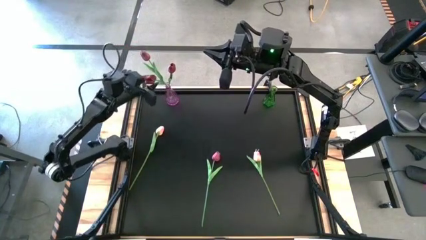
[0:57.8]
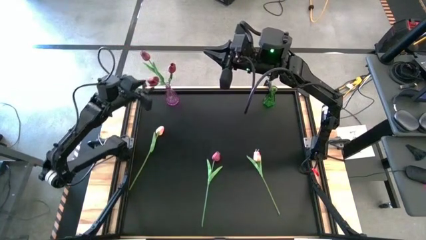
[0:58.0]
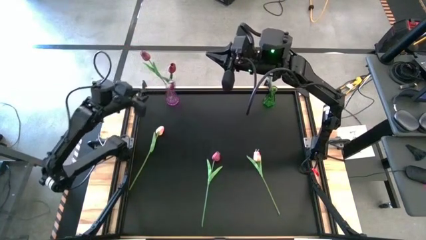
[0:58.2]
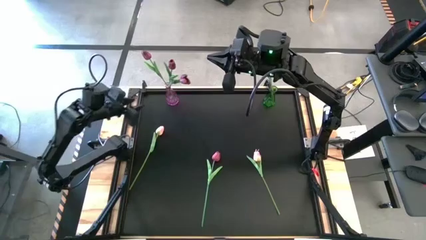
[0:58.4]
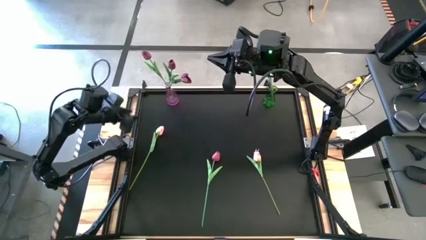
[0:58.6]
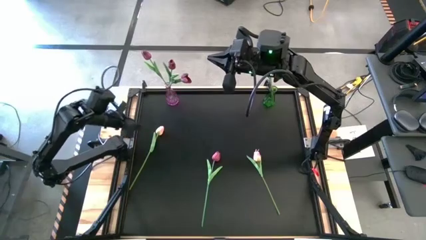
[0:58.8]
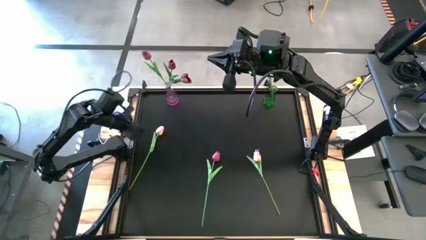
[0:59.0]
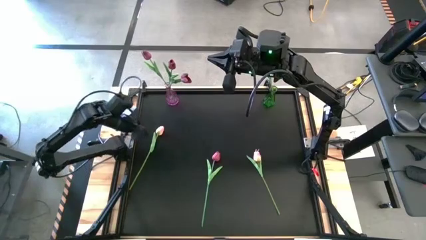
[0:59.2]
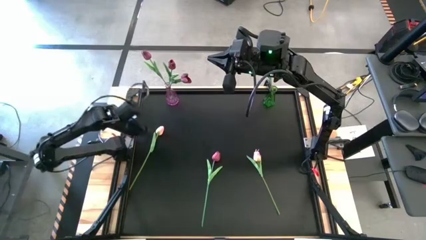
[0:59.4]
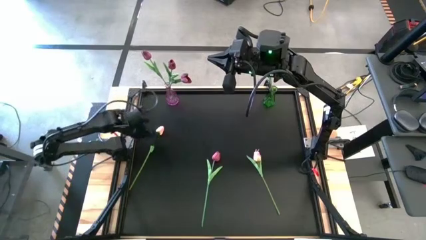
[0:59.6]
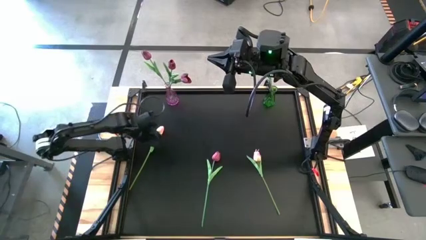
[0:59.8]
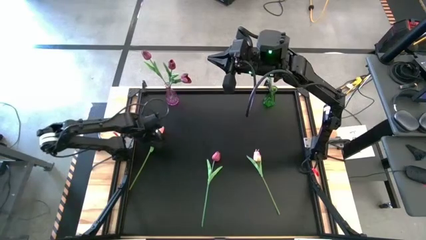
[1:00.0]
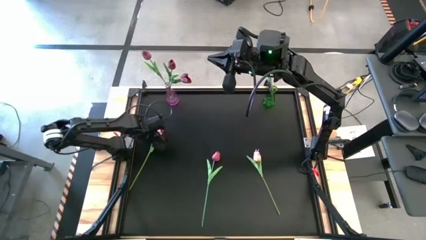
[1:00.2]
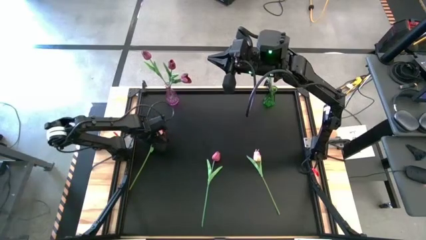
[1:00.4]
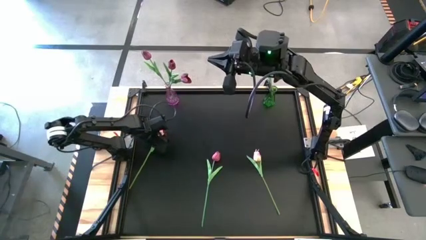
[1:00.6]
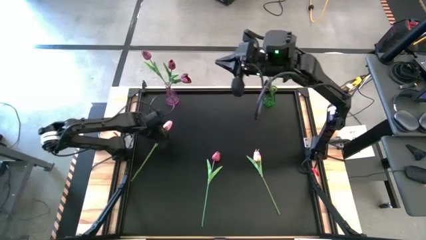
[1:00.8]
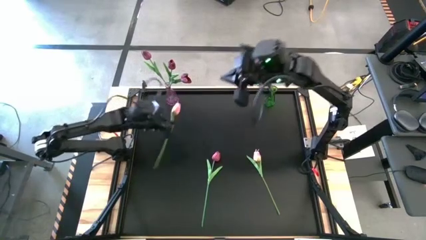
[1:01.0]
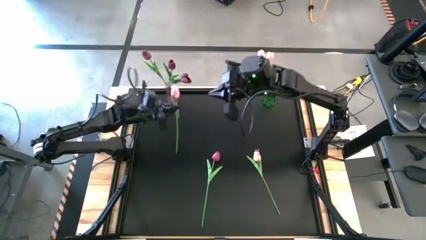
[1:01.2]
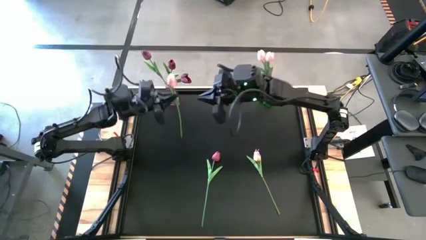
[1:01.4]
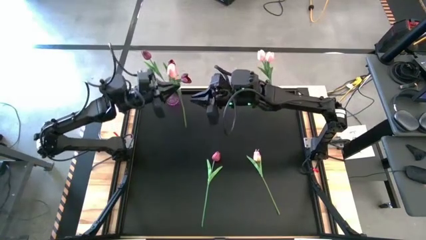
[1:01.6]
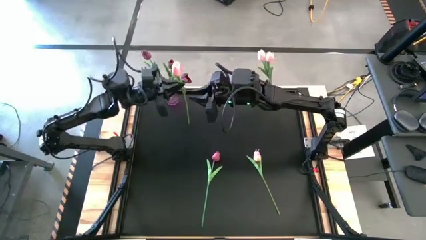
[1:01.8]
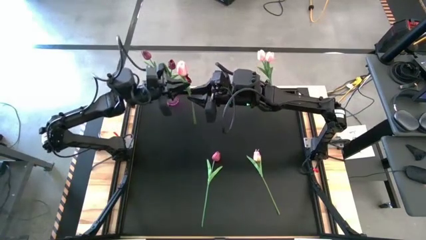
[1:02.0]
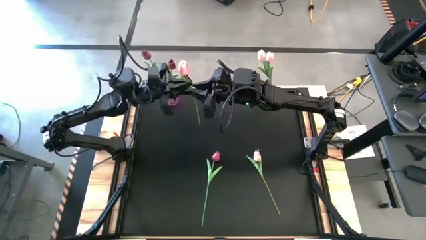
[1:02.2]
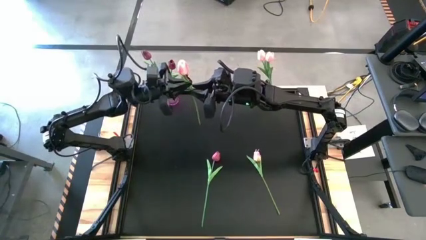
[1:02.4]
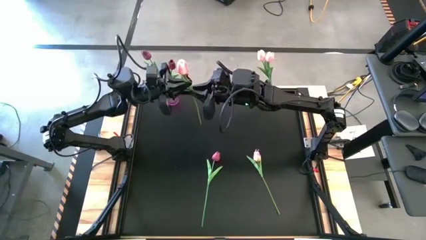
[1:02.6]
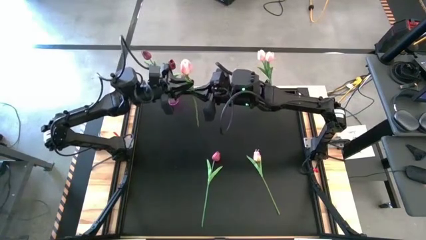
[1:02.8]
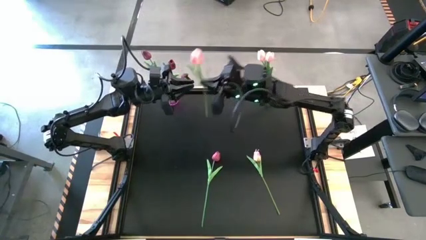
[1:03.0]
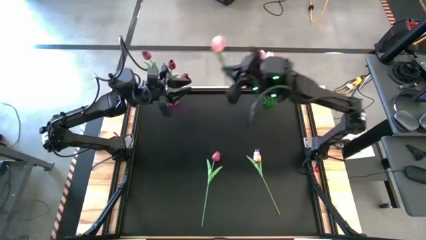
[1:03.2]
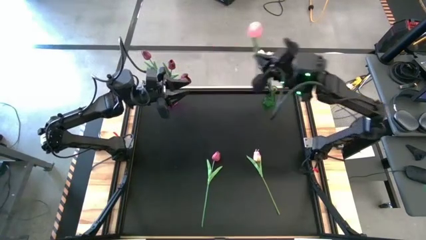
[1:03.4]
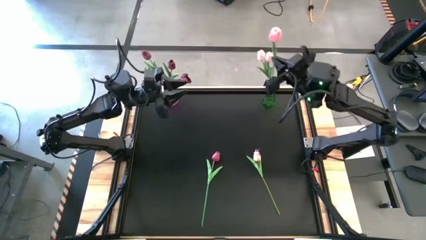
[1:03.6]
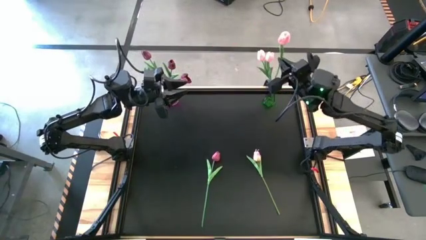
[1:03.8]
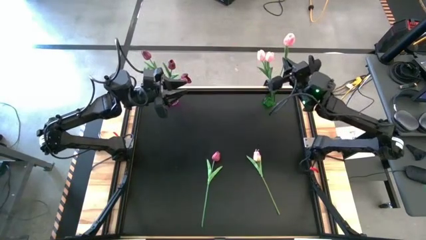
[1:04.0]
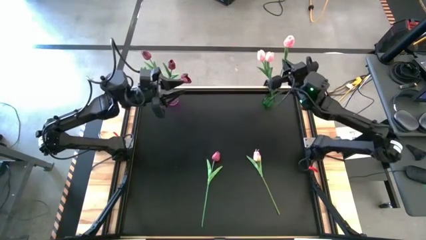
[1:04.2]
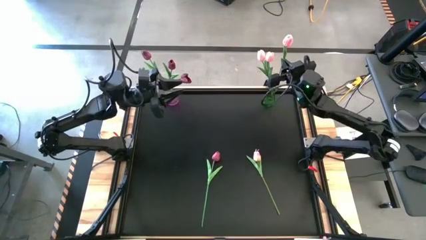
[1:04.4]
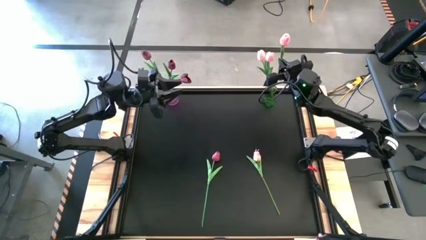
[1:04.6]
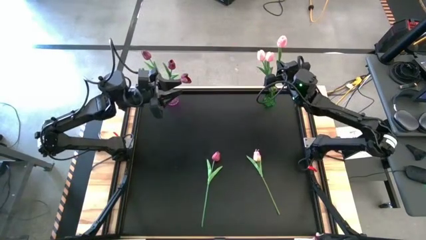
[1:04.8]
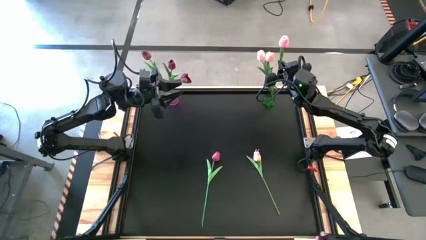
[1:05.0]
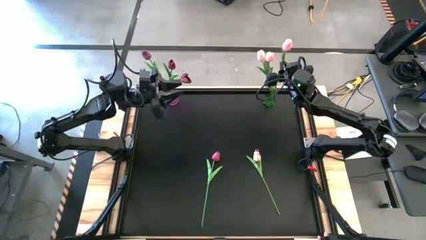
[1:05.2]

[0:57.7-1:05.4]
Task: Sort flowers into vase by color
Put the left pink flower into the green vase

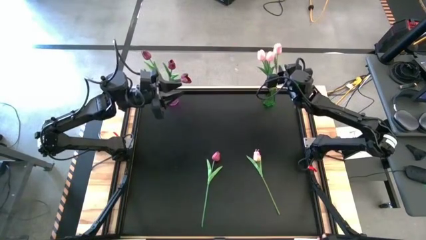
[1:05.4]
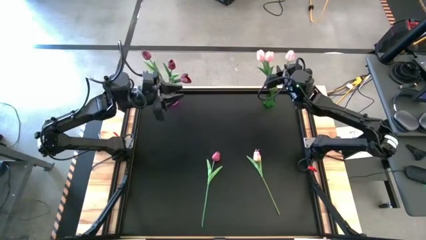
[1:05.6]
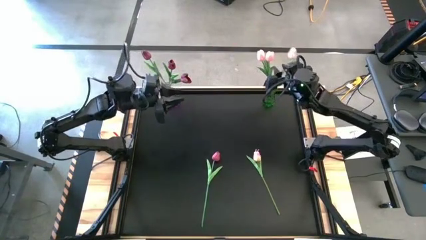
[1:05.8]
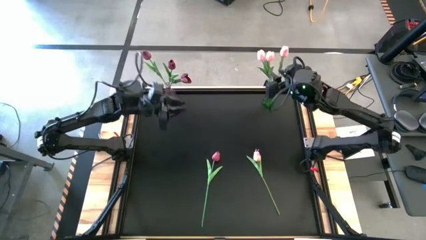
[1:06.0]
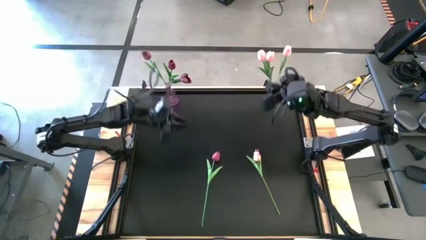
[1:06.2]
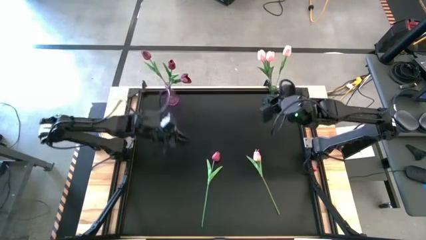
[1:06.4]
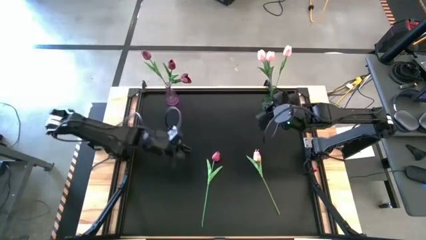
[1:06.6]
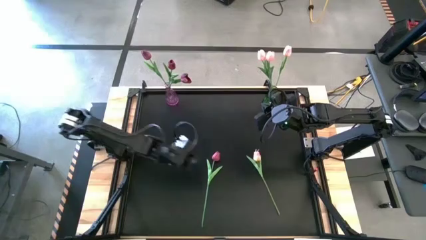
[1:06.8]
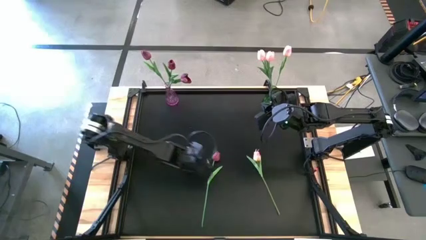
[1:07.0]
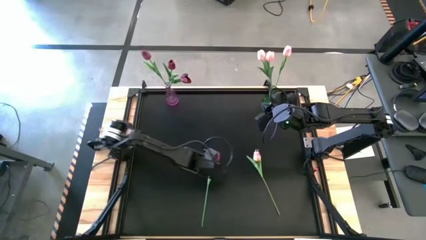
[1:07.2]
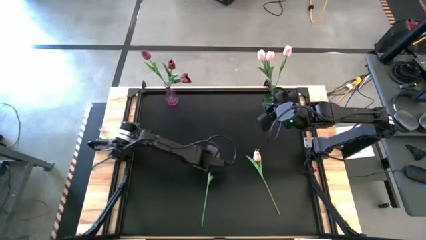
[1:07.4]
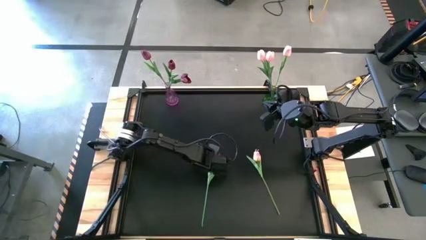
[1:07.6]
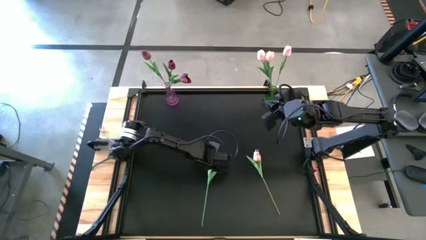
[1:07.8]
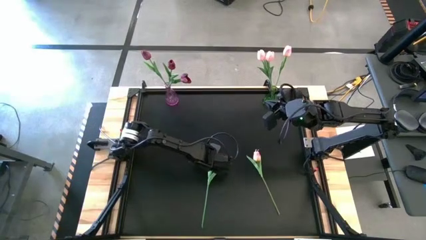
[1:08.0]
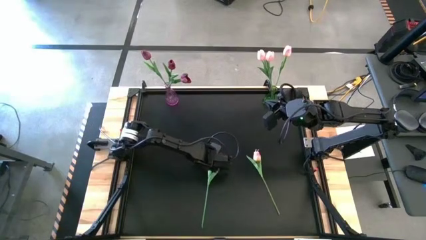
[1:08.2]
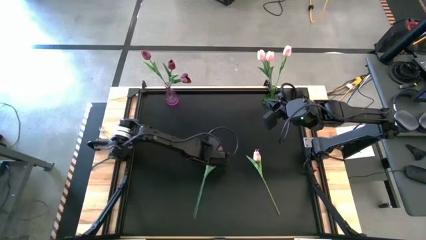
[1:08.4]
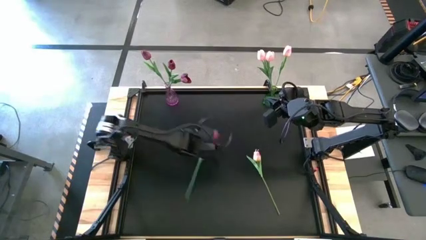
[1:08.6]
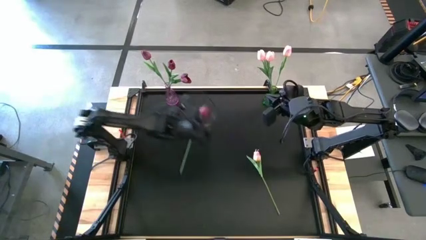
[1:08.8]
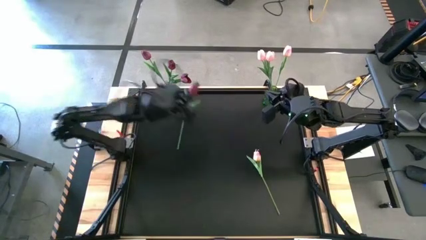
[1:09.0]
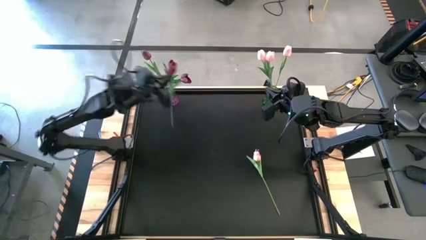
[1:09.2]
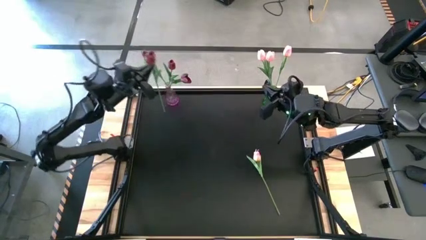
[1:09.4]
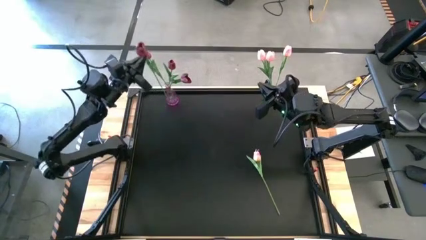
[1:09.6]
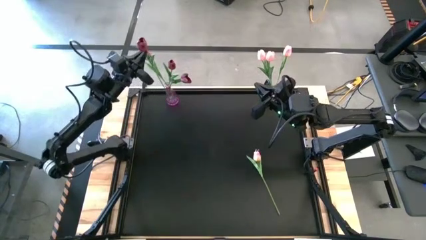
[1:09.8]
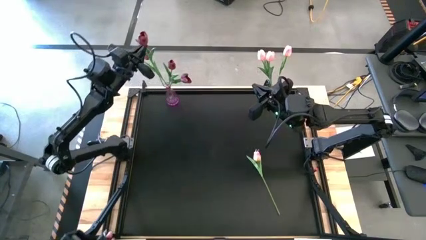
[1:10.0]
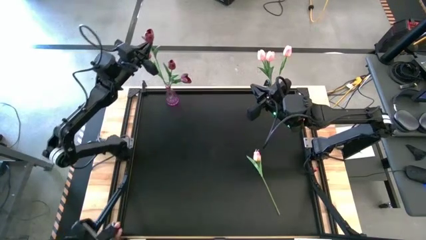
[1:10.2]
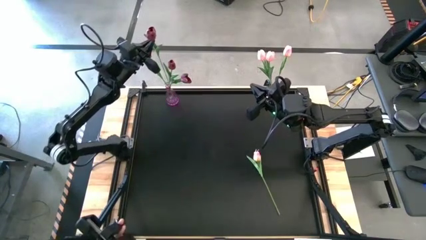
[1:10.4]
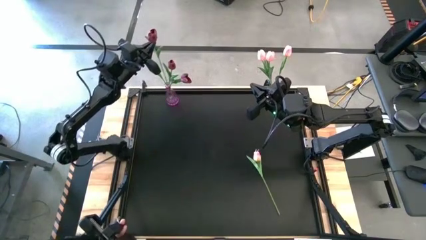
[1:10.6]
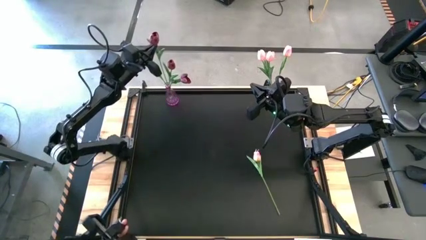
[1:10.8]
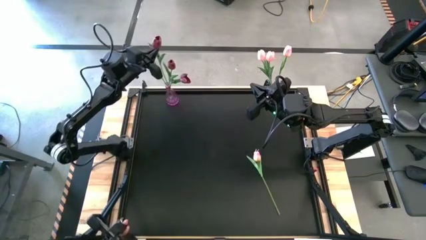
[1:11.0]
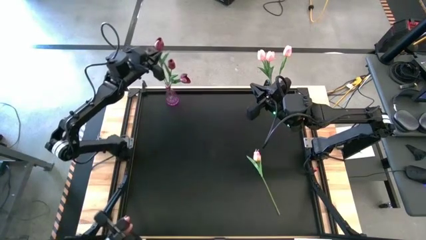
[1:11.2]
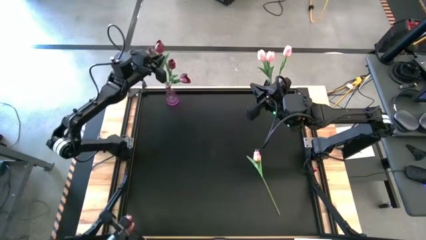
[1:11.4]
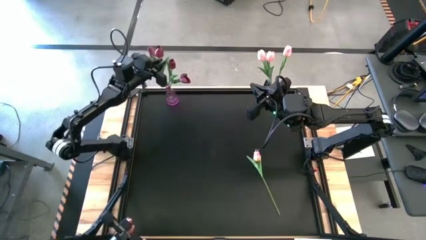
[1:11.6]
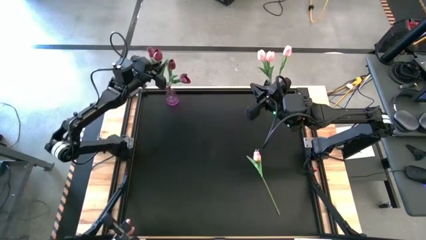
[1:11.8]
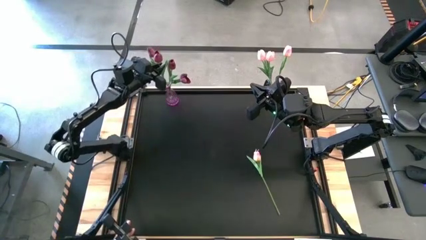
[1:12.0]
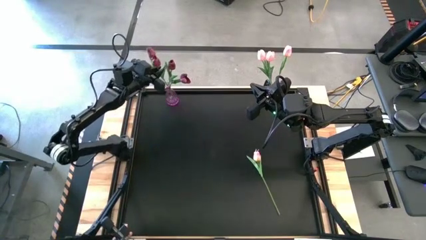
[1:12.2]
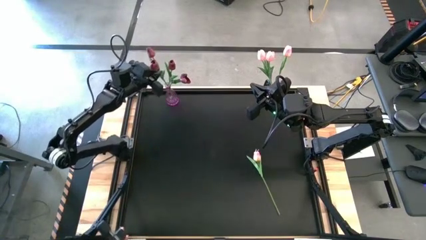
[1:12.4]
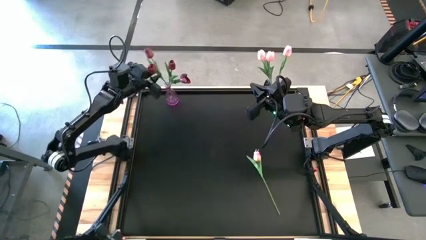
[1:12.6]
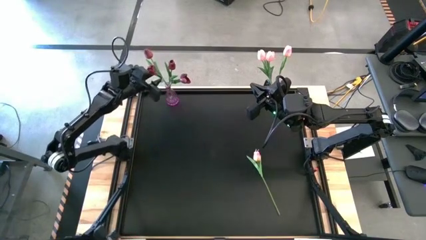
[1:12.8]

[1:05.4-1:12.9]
Put the red flower into the purple vase
